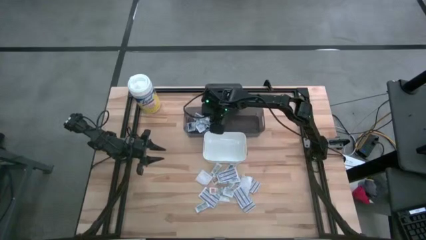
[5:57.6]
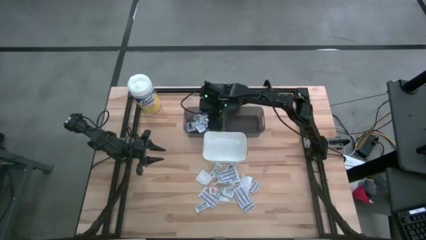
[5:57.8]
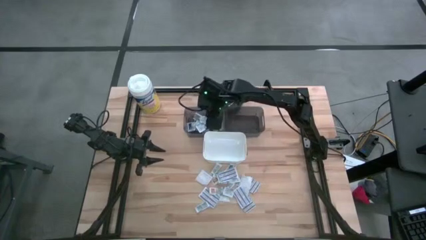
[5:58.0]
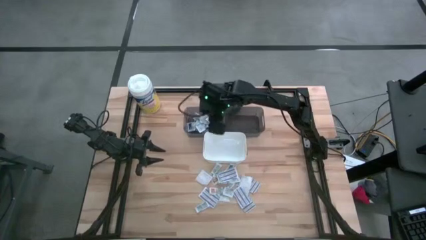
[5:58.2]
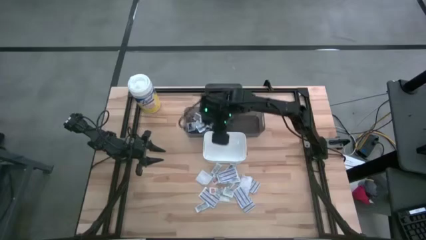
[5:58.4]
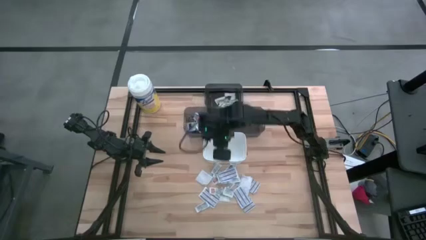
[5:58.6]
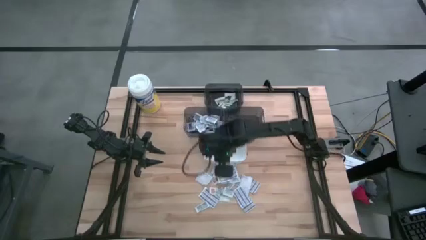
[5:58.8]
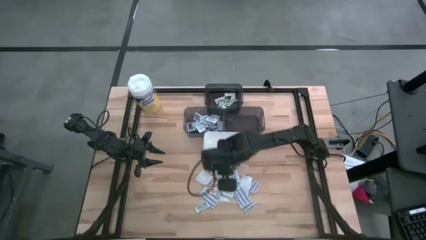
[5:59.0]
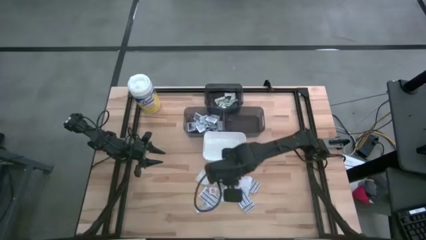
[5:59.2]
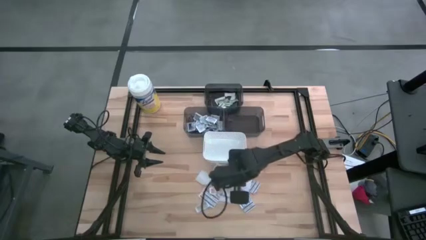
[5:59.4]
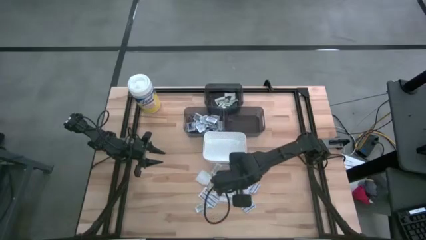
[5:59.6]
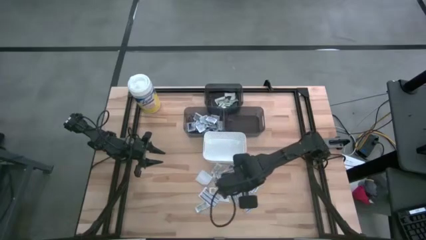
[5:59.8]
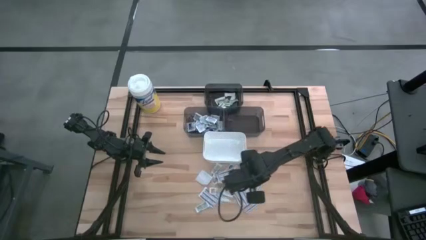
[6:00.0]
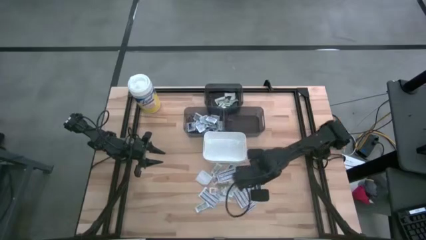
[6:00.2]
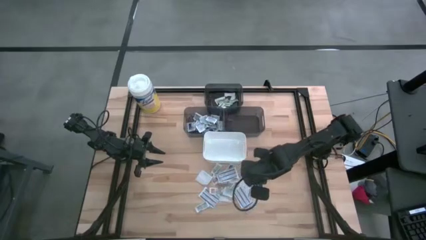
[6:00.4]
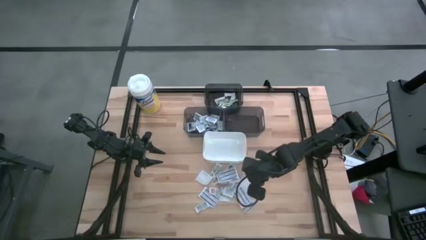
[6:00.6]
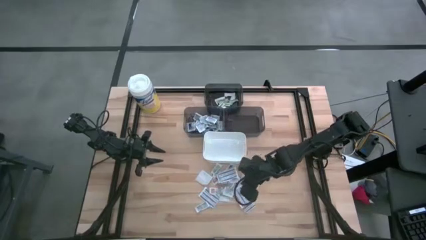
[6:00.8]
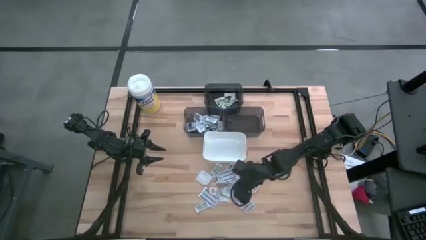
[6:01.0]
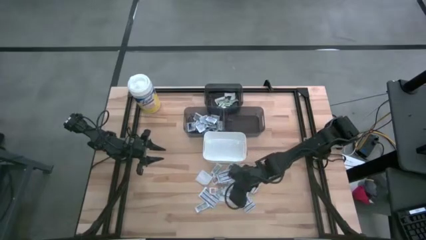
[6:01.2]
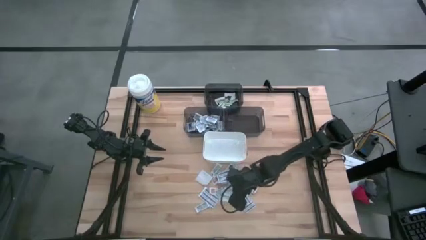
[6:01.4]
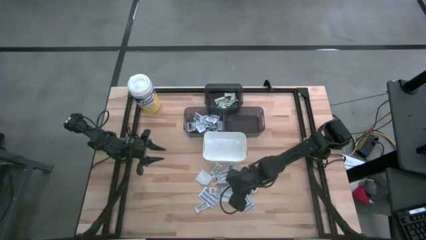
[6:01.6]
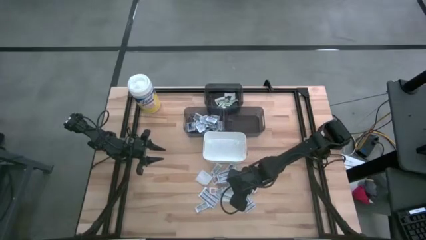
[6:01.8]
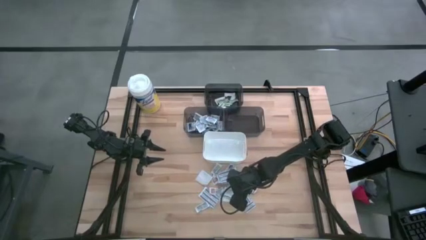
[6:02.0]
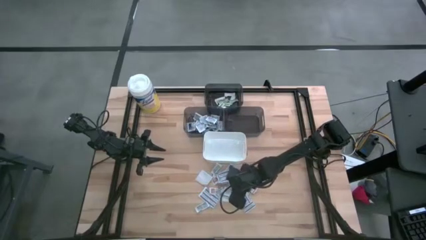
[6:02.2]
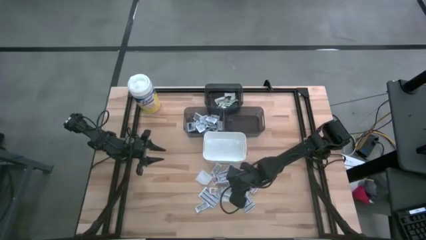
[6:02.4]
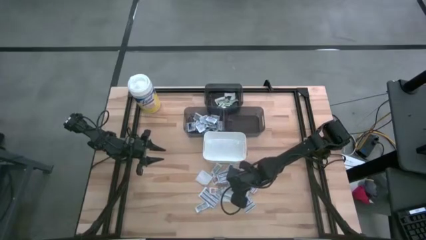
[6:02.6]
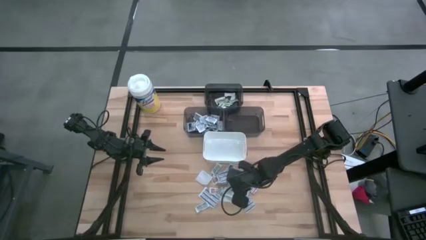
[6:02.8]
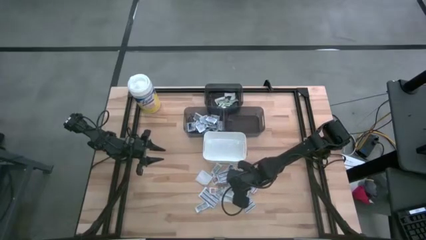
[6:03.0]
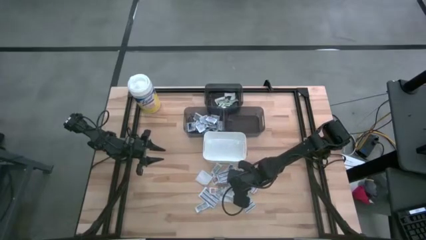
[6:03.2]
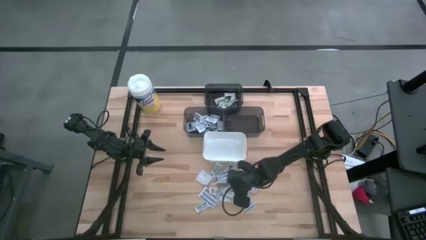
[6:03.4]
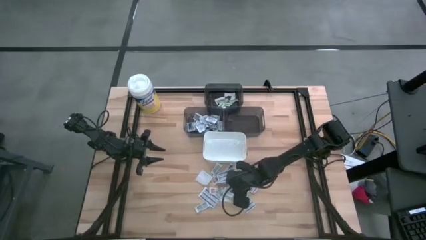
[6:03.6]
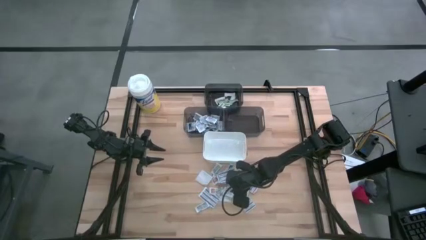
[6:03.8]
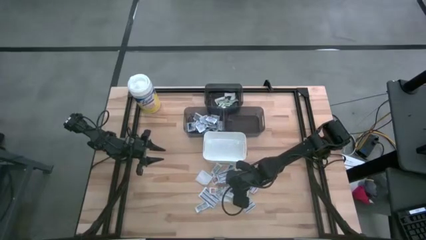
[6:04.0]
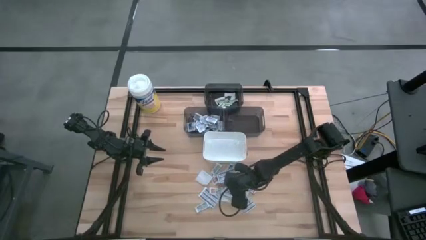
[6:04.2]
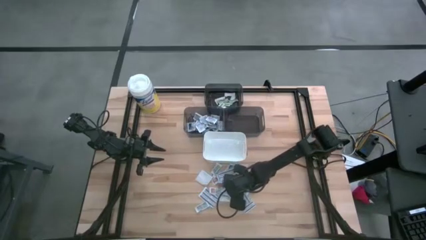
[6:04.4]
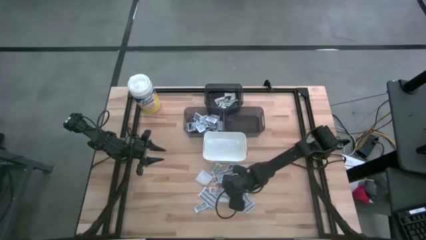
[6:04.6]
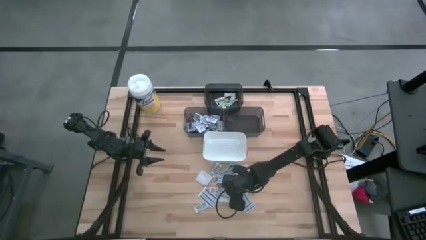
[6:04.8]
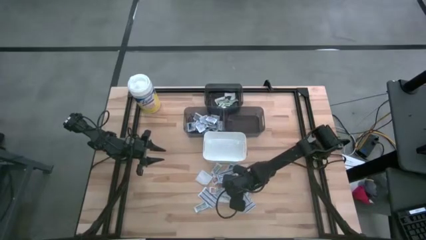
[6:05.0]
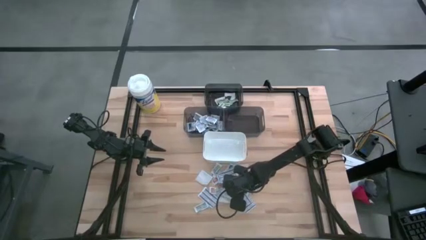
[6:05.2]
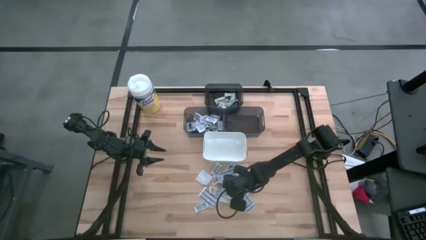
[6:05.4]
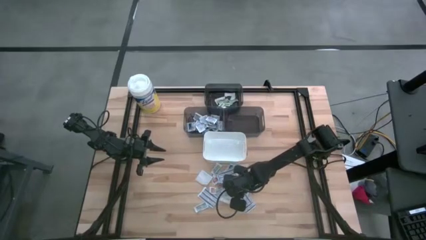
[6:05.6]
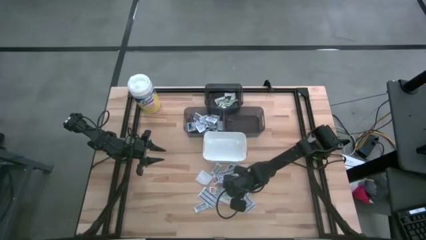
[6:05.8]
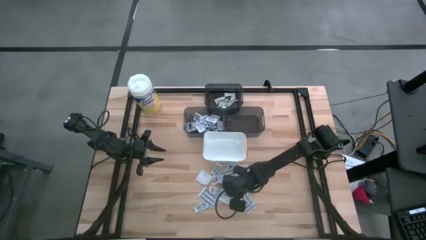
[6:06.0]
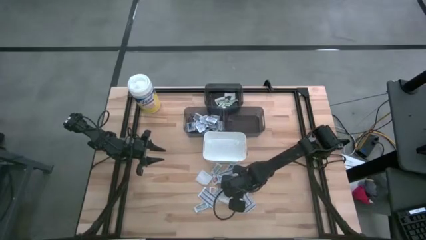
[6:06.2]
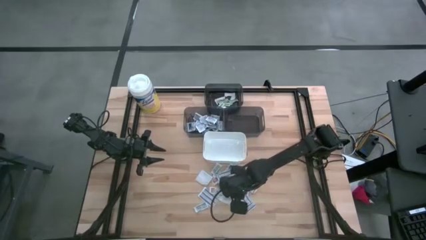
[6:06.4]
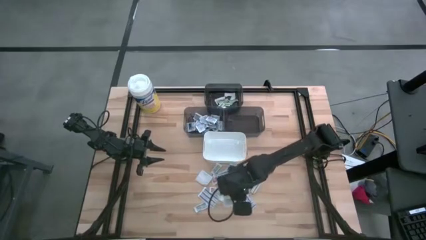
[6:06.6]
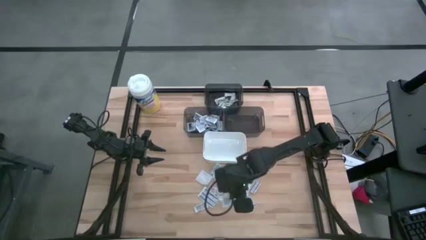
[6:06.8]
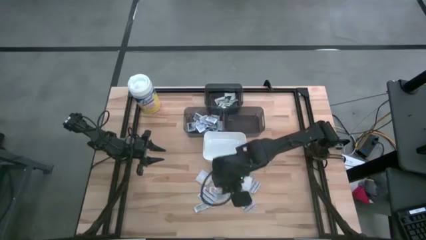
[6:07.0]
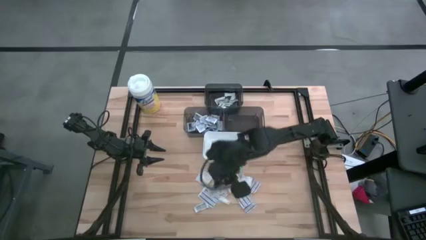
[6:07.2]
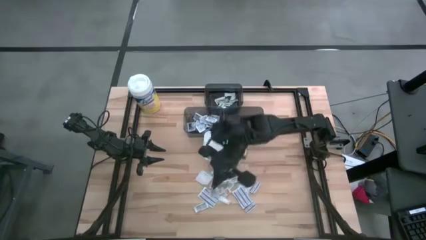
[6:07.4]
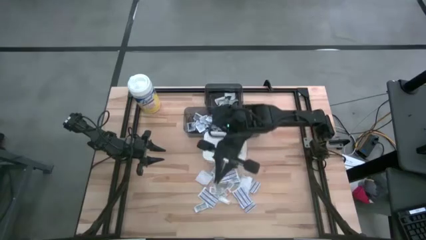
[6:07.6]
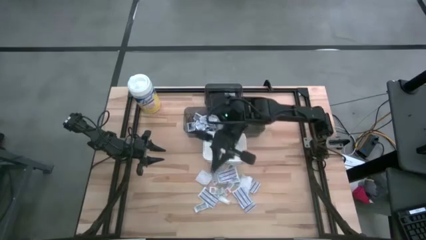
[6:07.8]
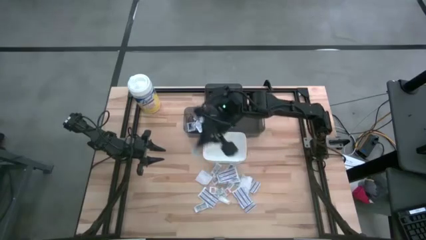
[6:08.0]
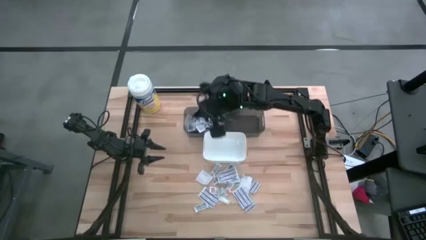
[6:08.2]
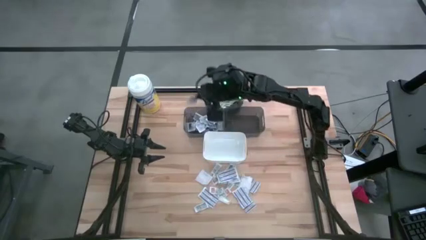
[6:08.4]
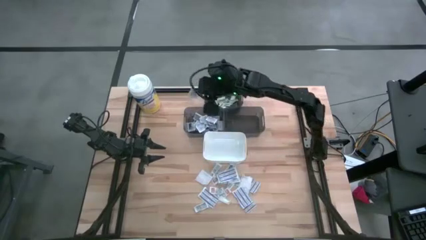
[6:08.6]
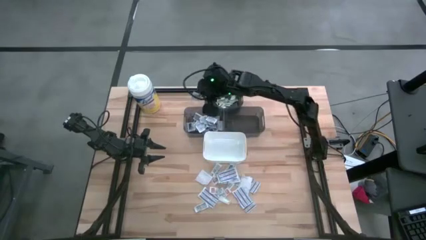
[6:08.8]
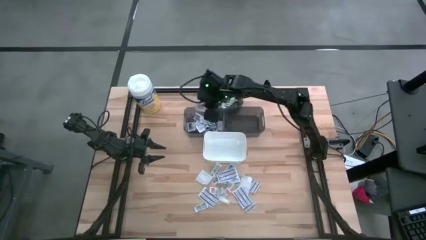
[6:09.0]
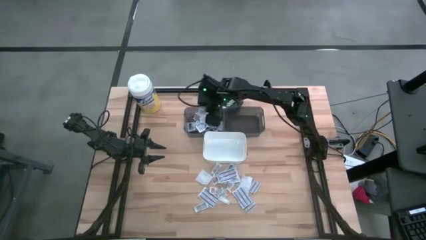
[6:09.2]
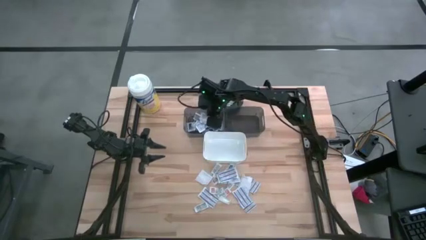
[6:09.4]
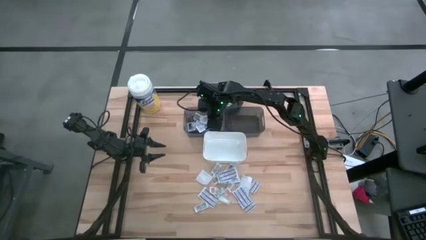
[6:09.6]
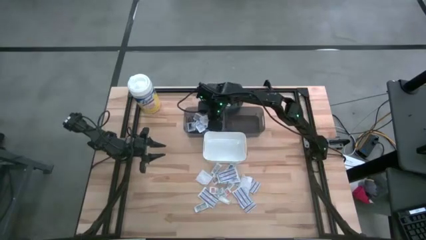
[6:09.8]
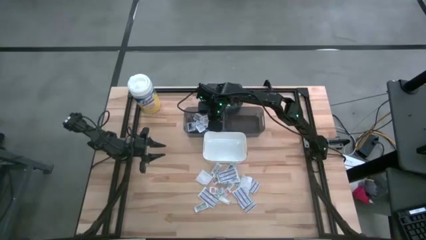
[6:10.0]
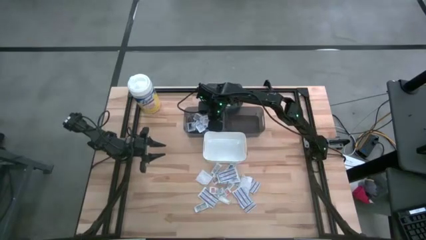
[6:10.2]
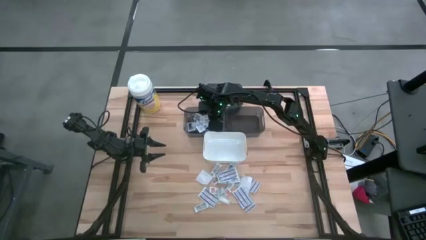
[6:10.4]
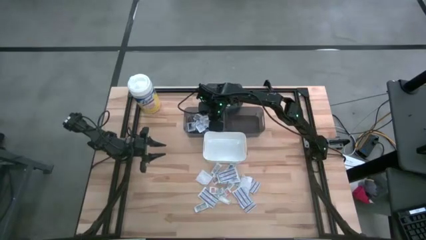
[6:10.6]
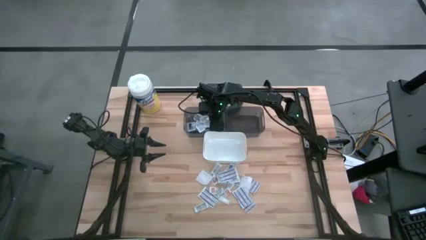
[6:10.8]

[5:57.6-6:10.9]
Task: Pick & Place First Aid Supplies
Put the alcohol pad into the left black bin

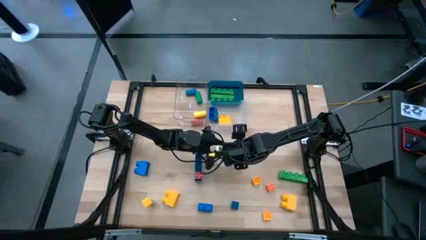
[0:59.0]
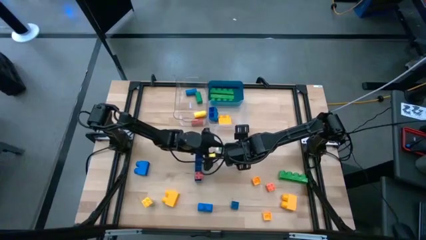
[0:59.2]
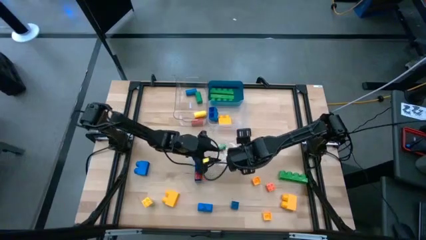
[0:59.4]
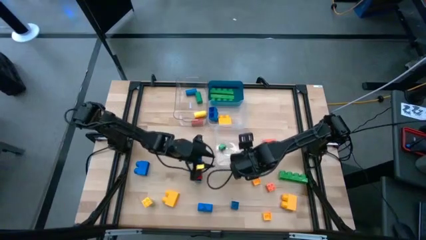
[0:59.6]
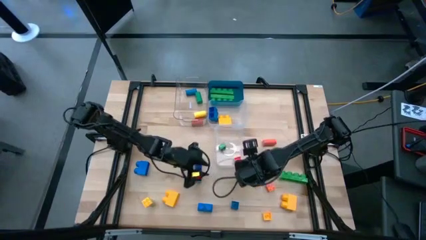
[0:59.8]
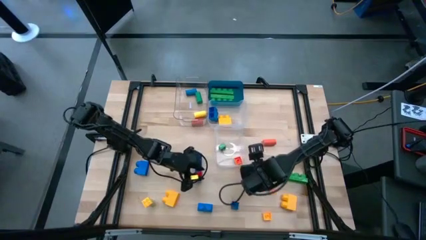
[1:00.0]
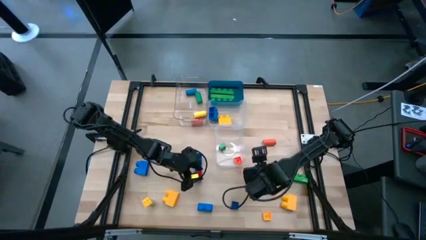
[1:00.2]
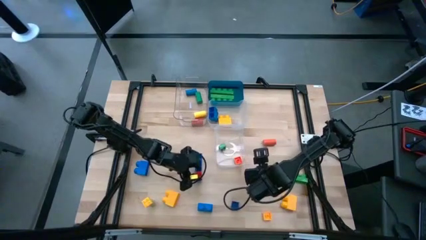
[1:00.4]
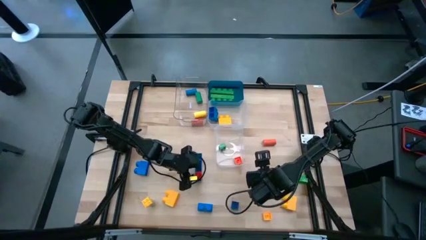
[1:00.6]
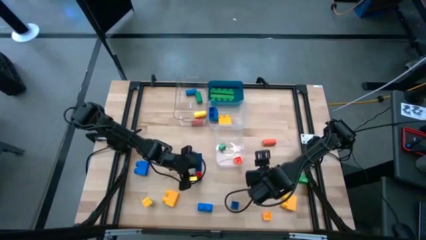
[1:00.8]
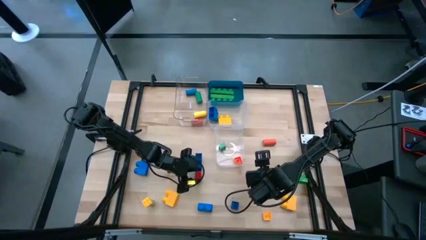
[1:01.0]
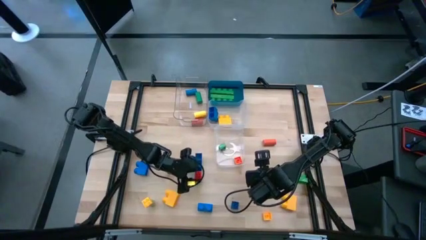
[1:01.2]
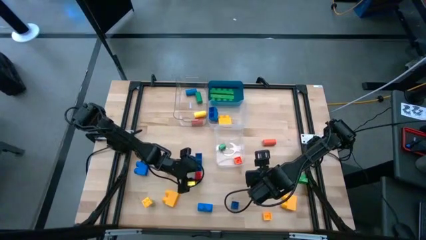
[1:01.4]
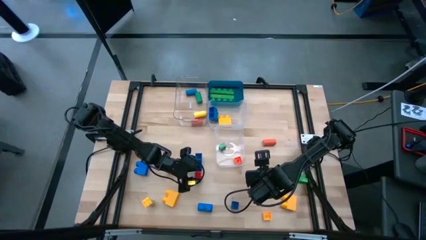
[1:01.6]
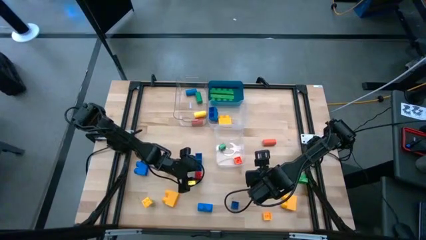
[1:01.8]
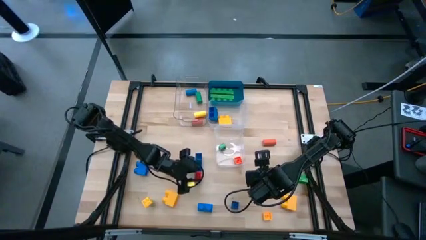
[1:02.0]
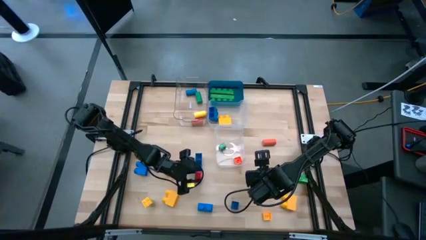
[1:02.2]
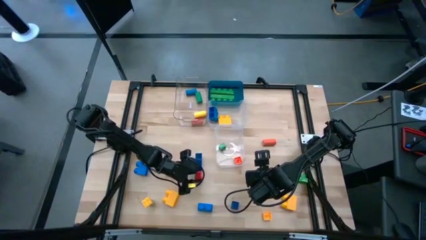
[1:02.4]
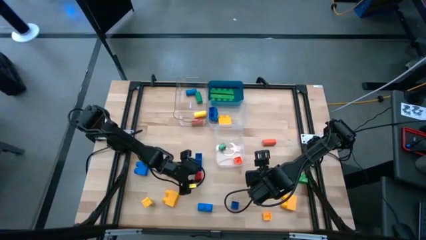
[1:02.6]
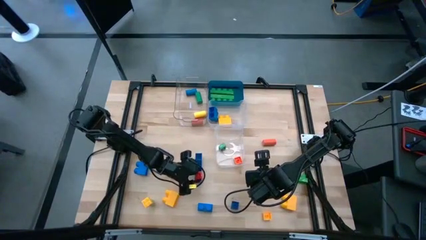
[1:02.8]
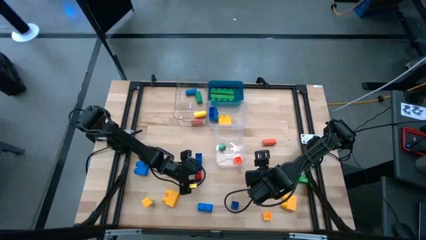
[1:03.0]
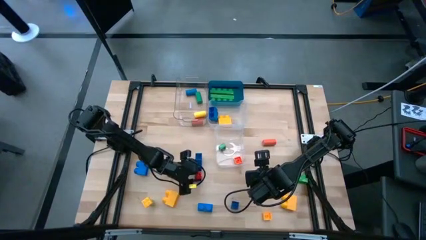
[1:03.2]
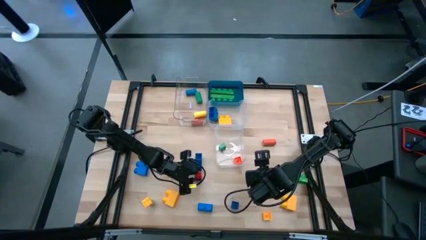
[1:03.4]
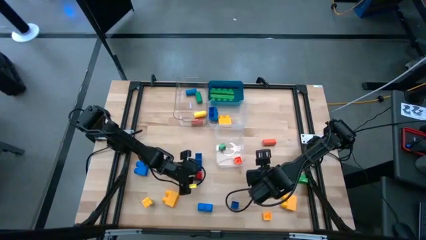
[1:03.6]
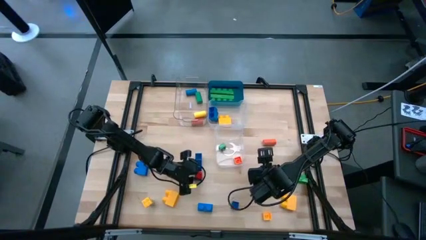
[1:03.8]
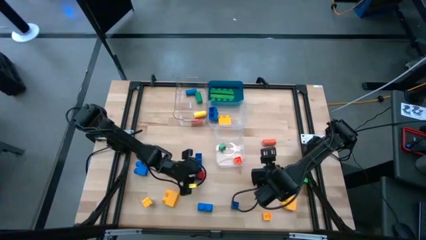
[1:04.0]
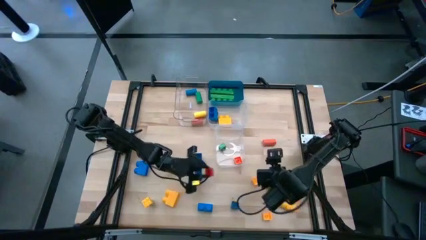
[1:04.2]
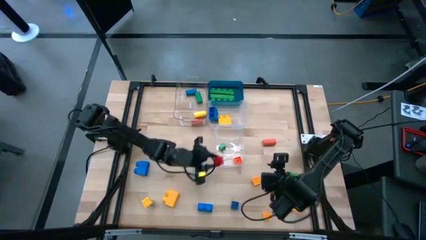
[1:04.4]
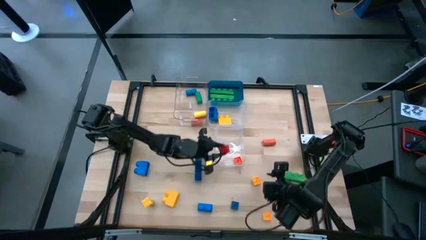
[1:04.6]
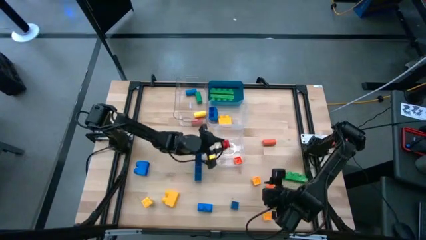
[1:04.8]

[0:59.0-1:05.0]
Task: Sort blocks by size
Put the red 4 stud small game piece into the bottom transparent bin
